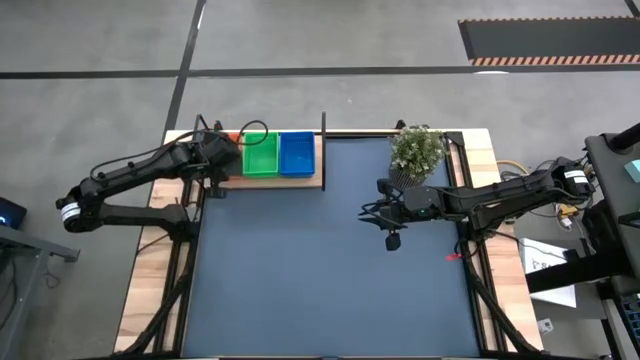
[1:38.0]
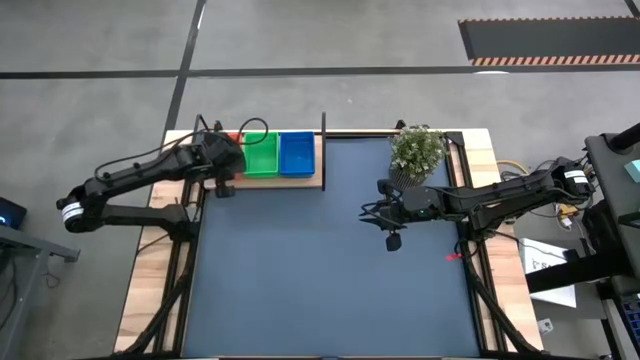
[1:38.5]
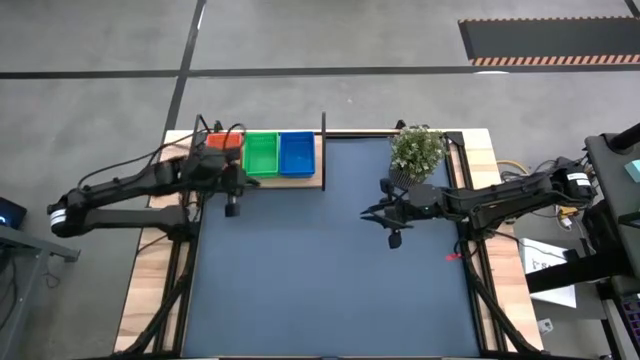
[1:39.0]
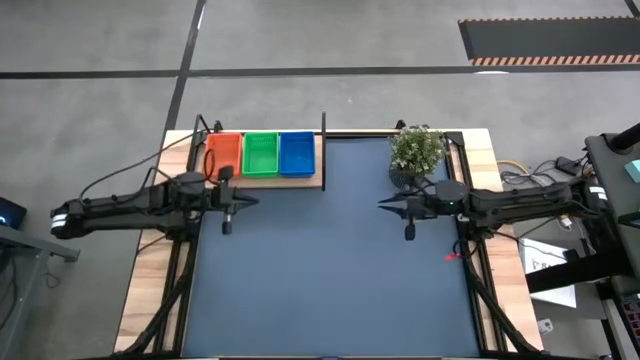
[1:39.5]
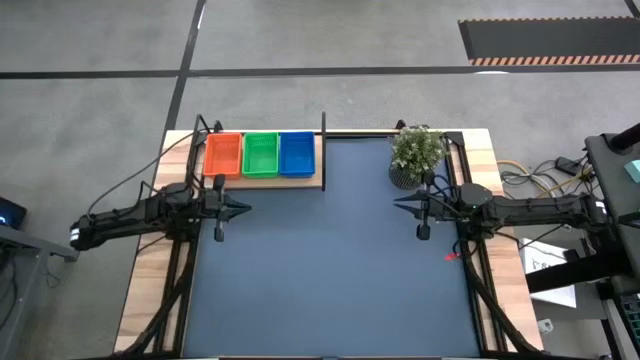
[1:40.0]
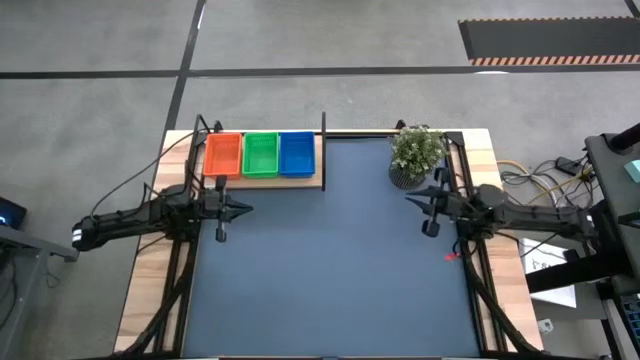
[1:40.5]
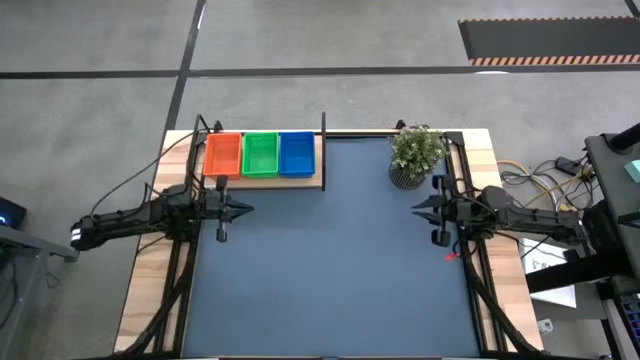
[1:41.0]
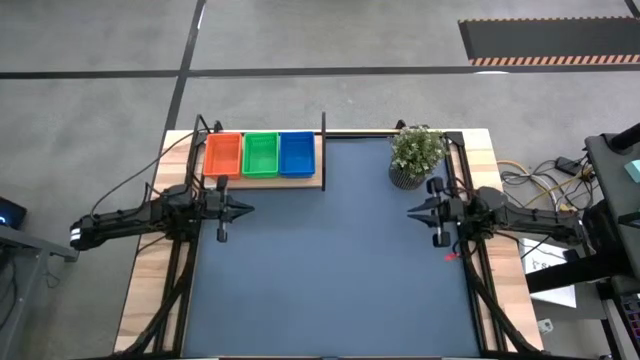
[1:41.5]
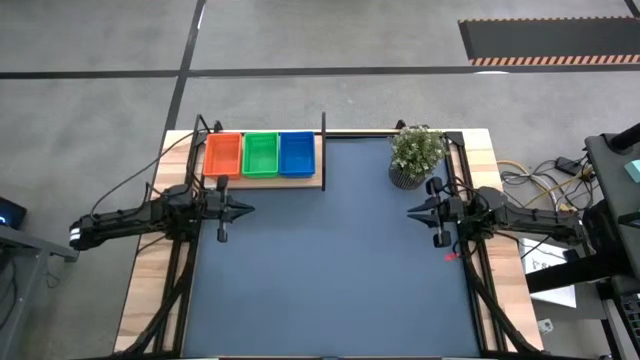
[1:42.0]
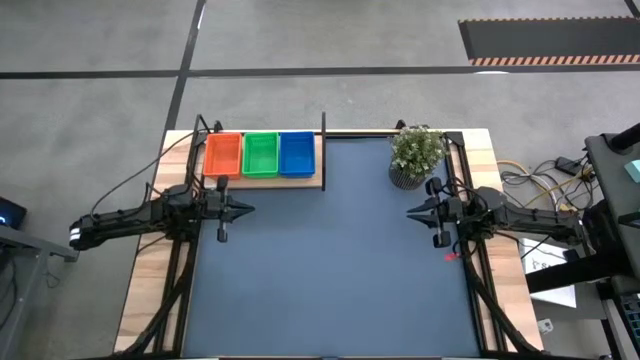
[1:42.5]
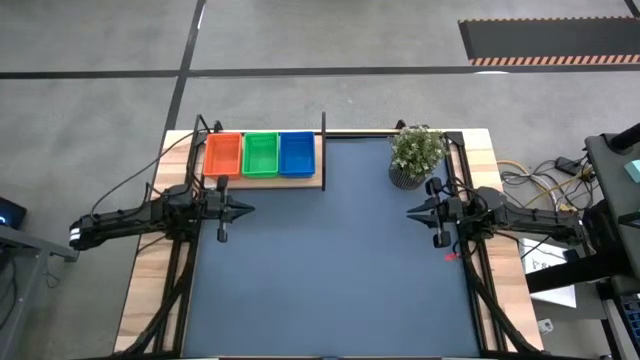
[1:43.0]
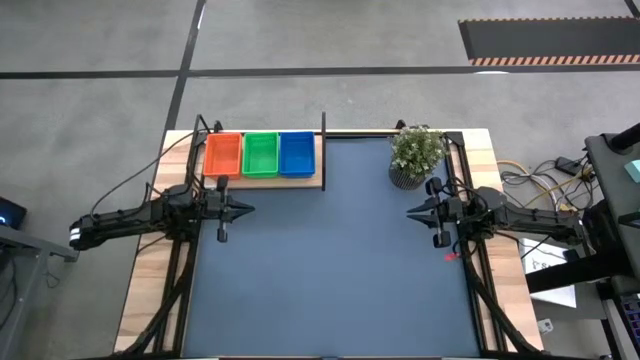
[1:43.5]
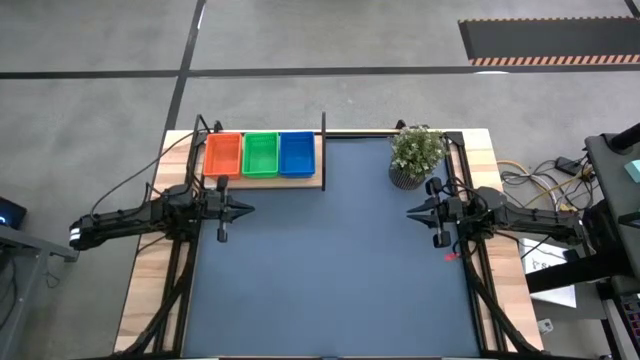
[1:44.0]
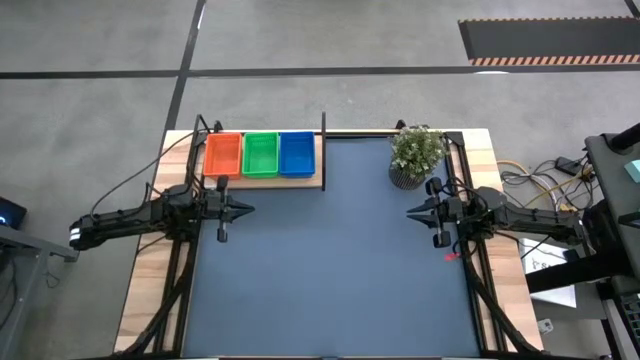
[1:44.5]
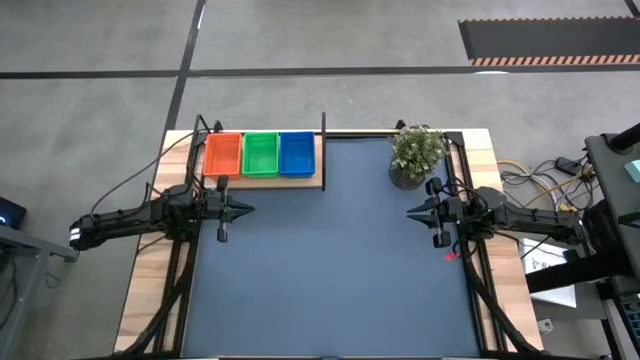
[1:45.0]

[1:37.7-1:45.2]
Task: Stack baskets on shelf by color
Return to Home Position

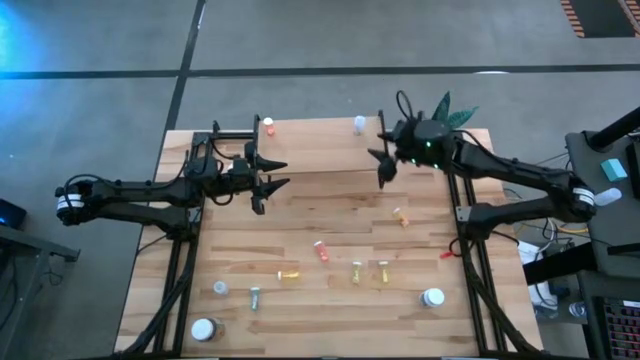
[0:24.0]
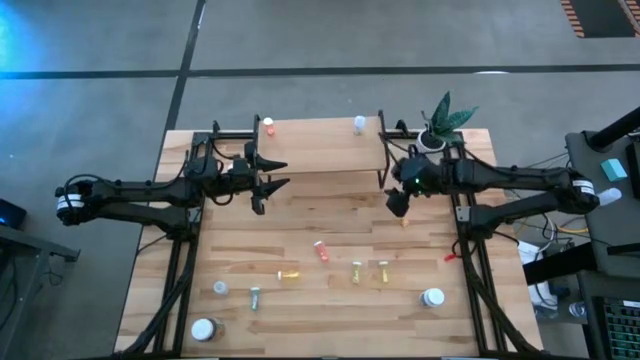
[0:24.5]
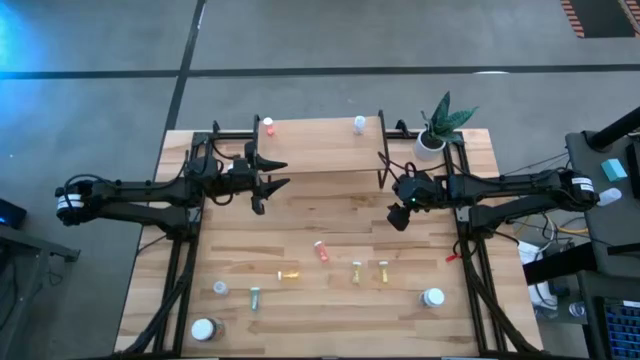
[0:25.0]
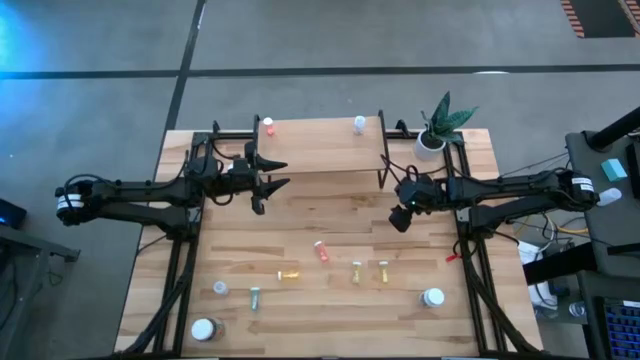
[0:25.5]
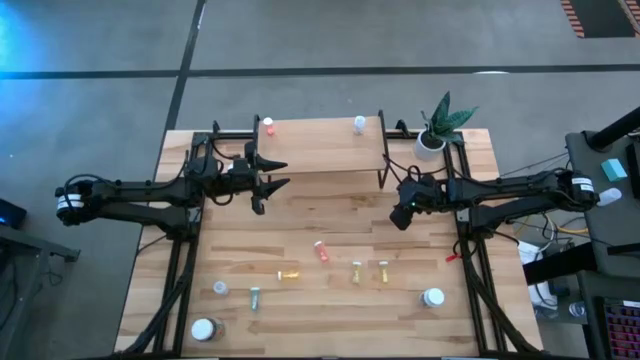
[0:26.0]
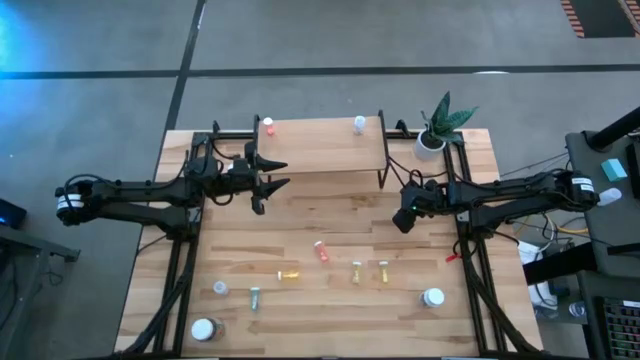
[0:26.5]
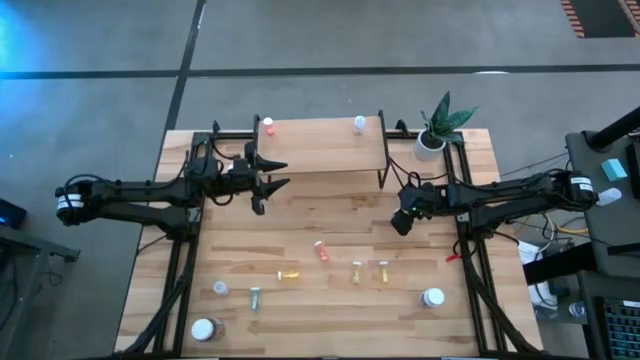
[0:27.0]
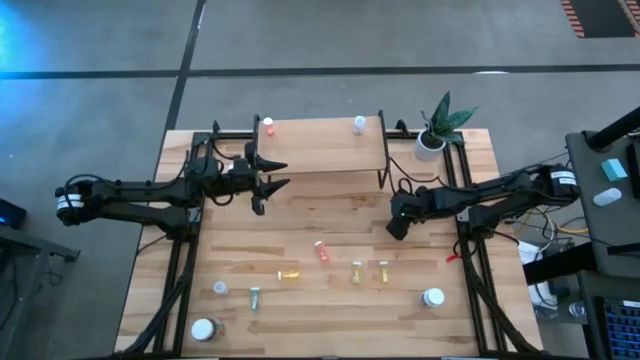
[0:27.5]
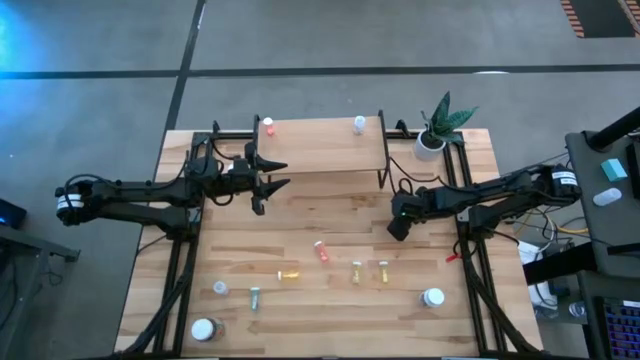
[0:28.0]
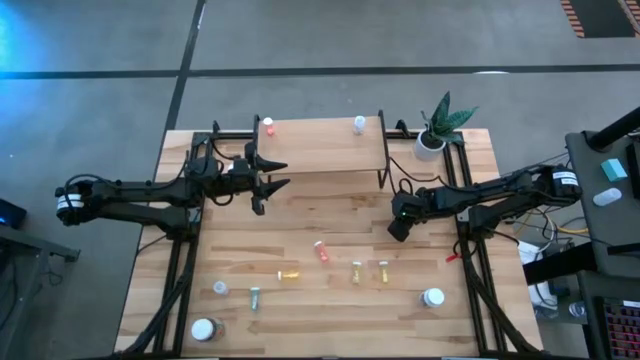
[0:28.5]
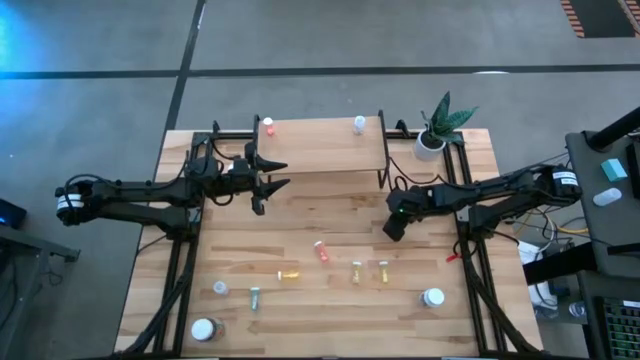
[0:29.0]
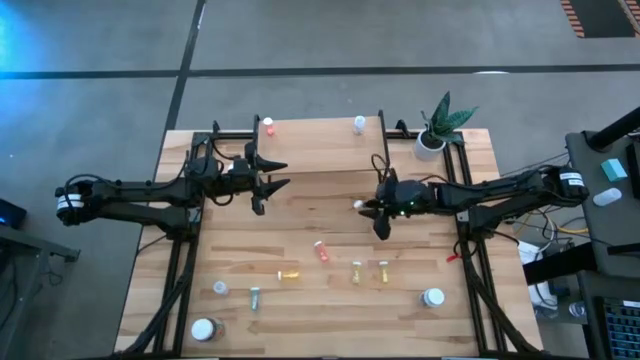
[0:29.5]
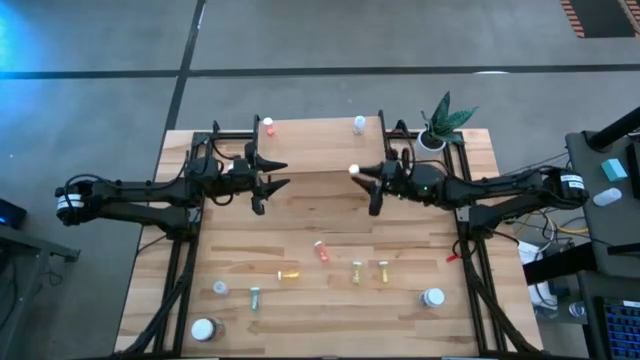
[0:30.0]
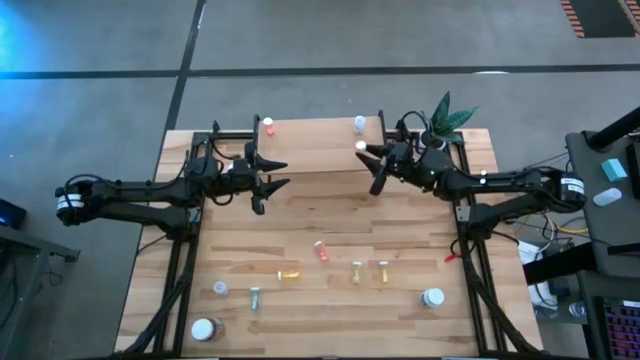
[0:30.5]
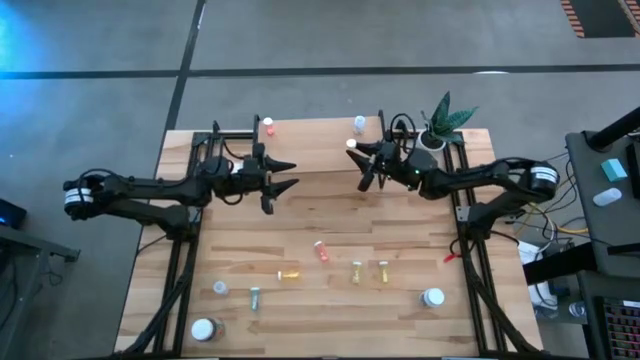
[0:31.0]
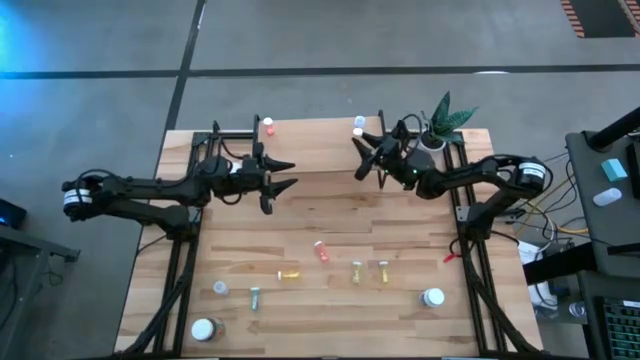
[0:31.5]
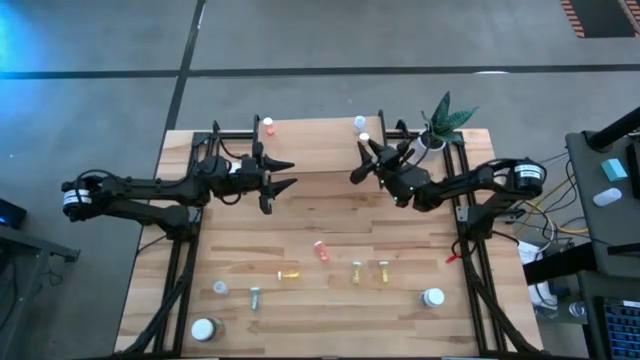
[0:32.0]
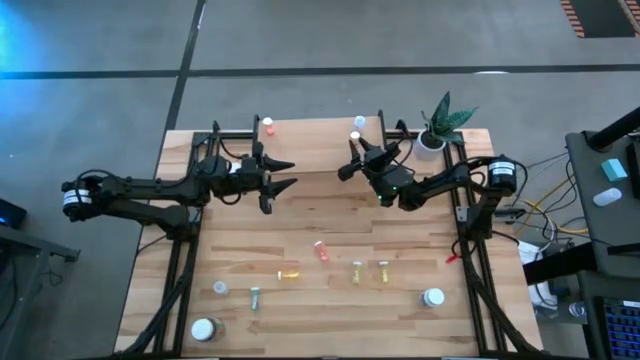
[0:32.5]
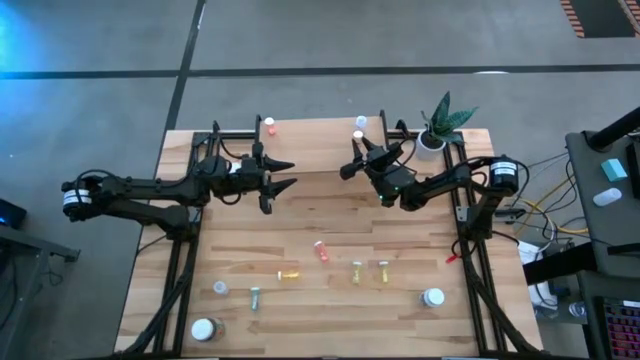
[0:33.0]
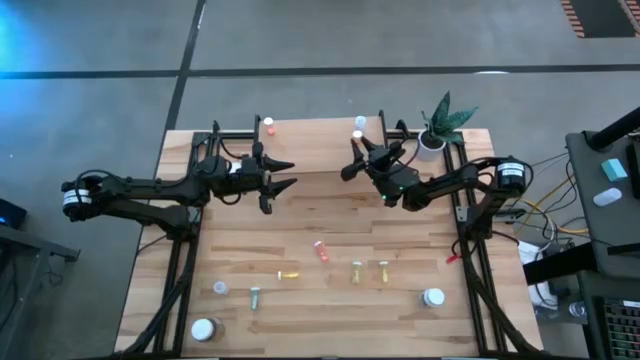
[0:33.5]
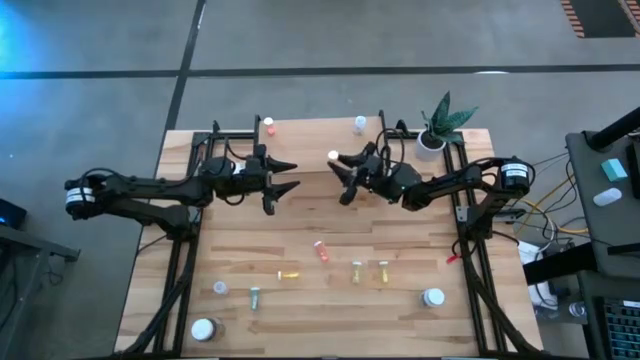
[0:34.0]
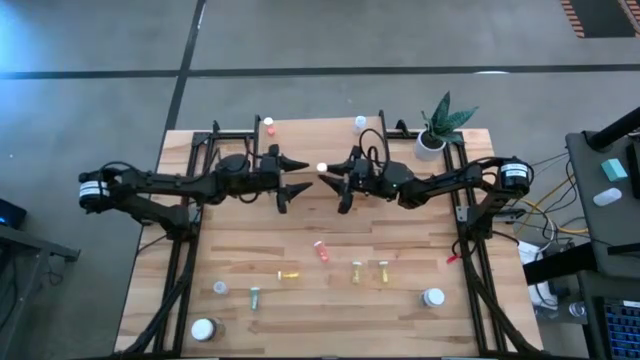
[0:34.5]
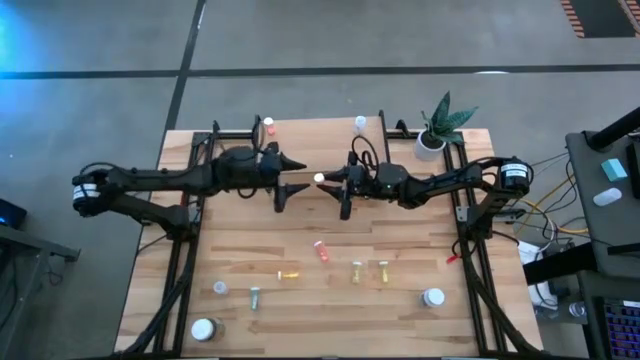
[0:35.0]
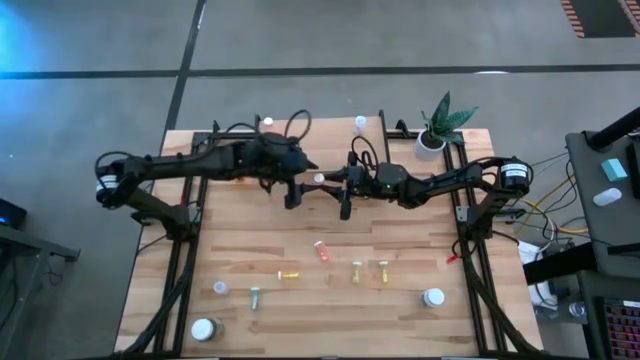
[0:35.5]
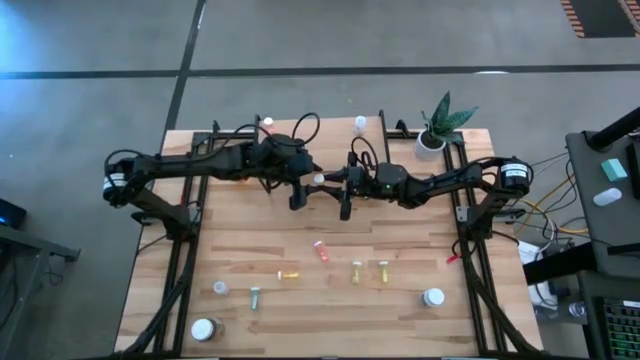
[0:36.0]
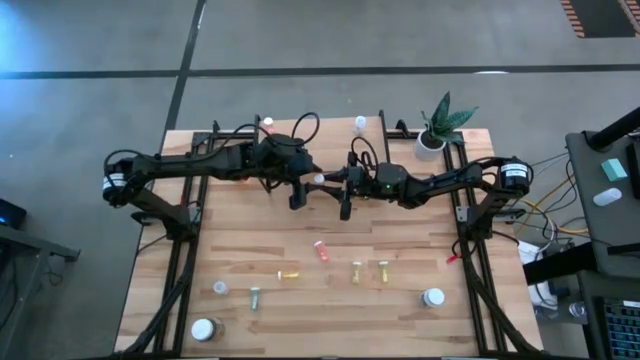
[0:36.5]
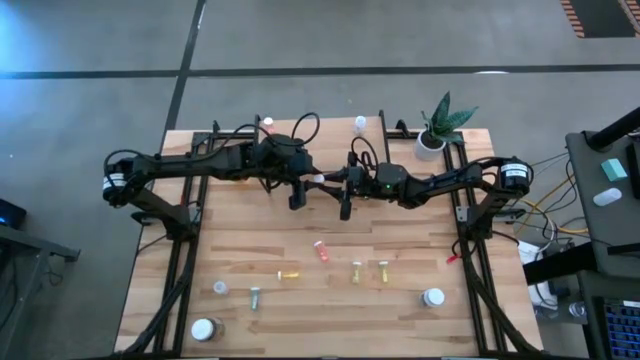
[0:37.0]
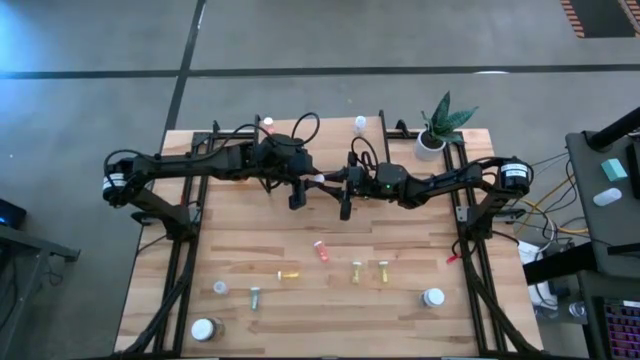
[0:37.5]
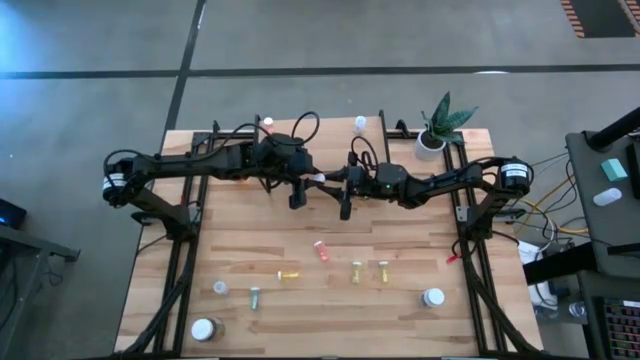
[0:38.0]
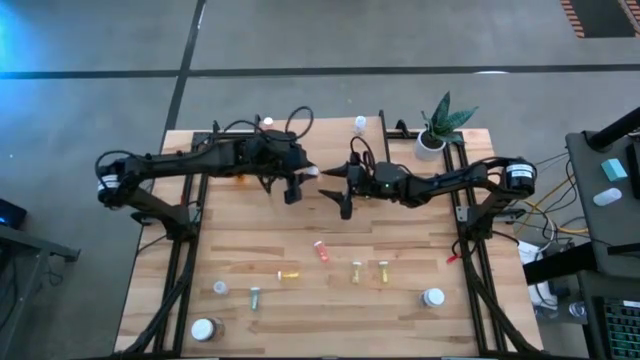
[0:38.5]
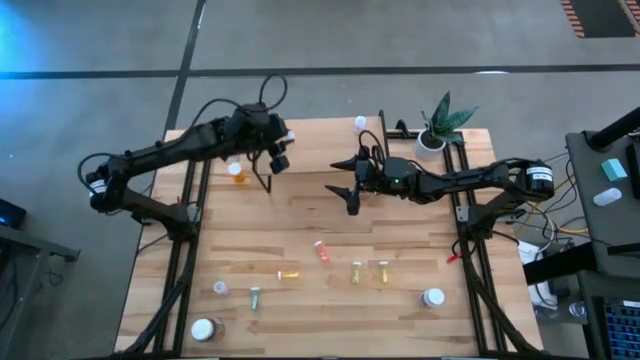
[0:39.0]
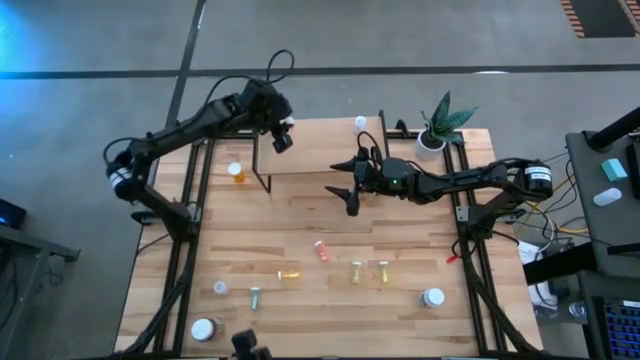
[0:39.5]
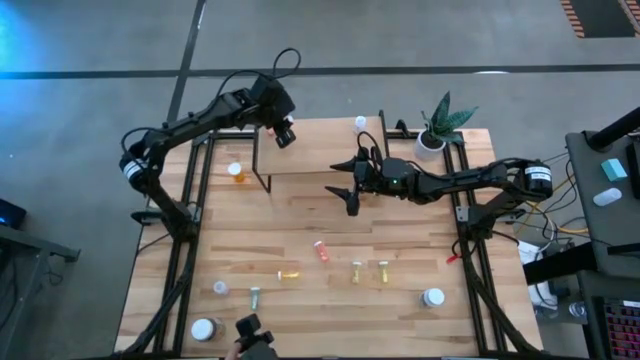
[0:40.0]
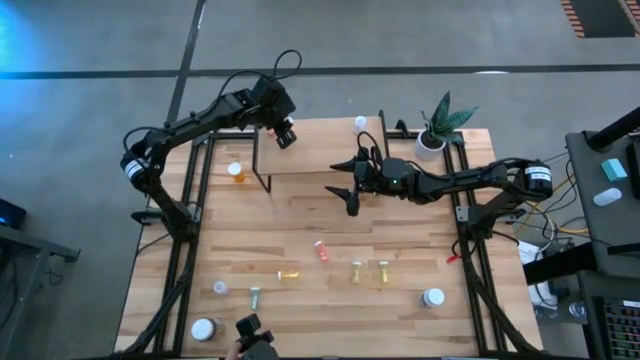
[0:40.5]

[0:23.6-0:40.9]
Task: Pick and place medicine bottles onto shelf by color
Put the top yellow pill bottle on the shelf
